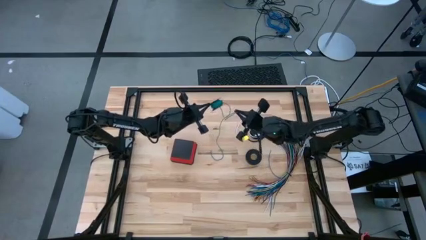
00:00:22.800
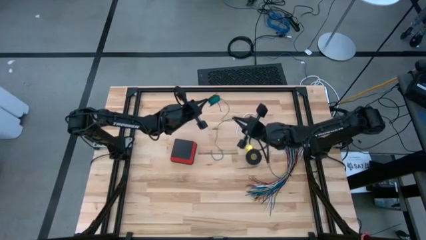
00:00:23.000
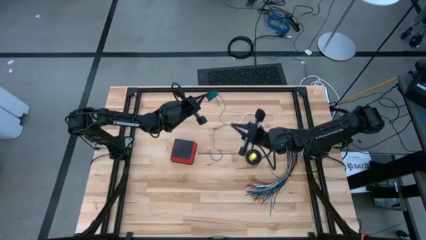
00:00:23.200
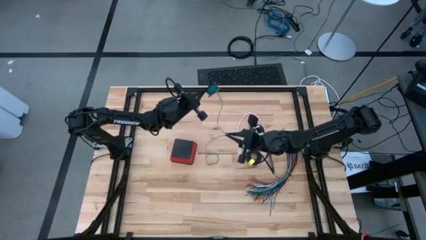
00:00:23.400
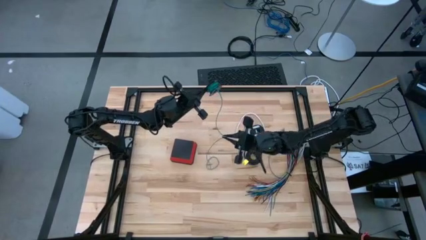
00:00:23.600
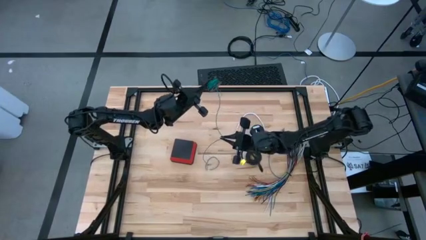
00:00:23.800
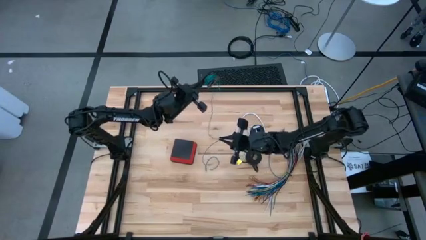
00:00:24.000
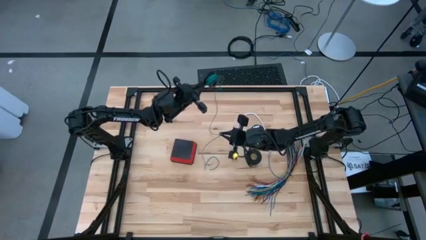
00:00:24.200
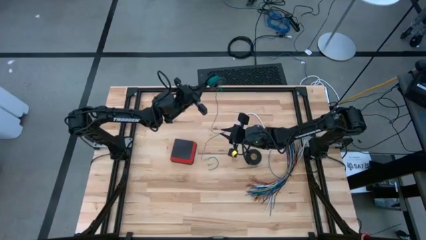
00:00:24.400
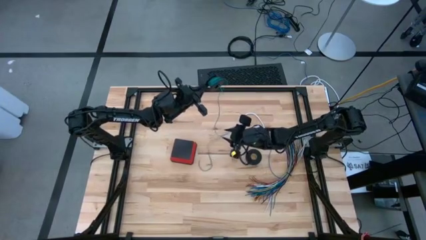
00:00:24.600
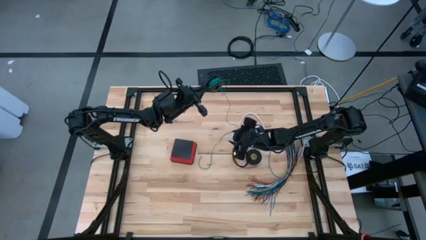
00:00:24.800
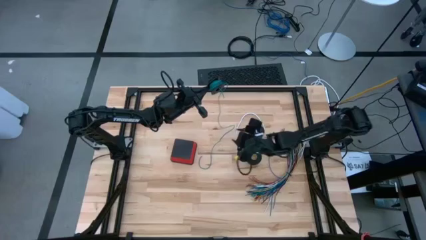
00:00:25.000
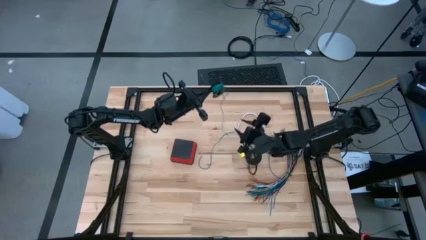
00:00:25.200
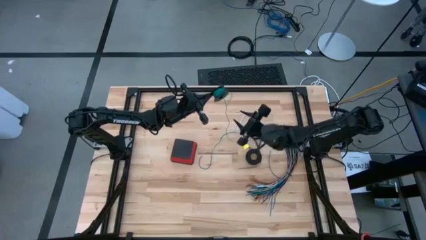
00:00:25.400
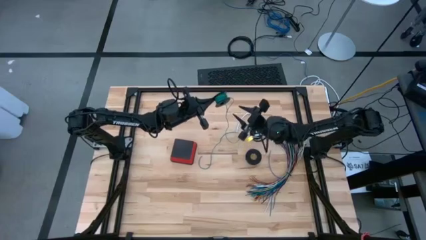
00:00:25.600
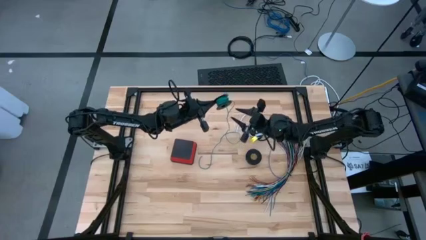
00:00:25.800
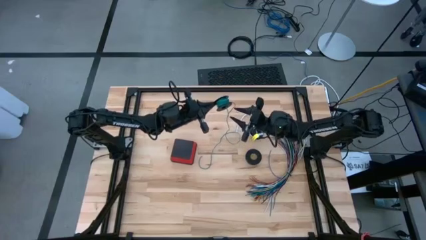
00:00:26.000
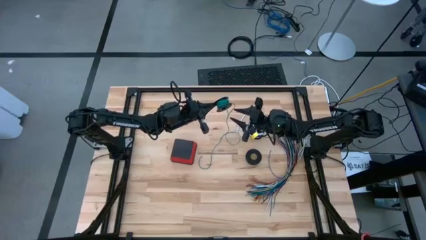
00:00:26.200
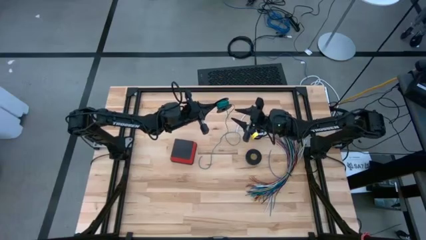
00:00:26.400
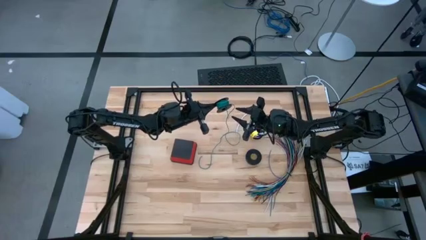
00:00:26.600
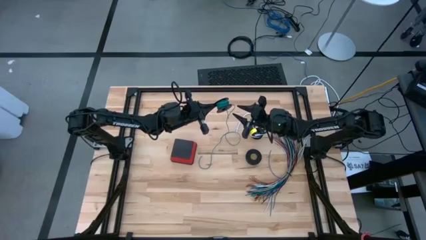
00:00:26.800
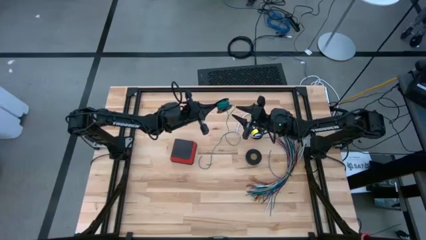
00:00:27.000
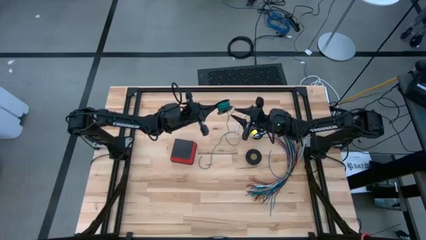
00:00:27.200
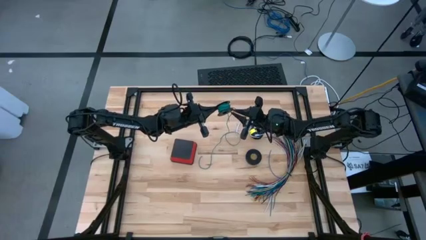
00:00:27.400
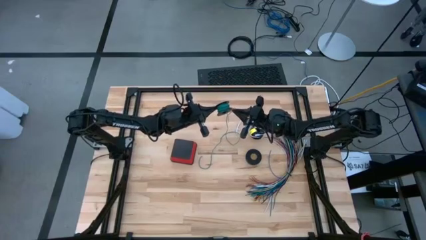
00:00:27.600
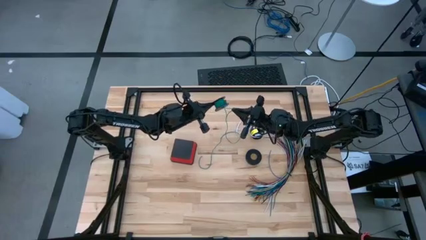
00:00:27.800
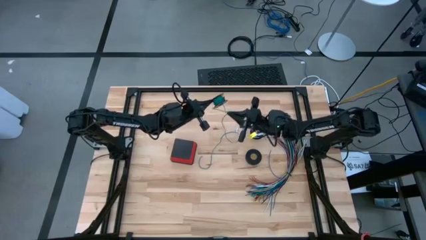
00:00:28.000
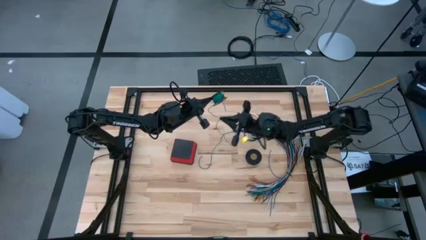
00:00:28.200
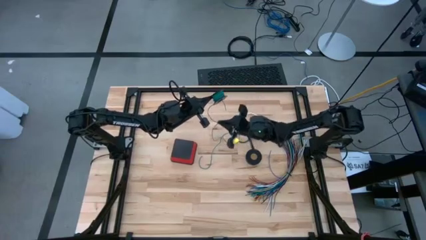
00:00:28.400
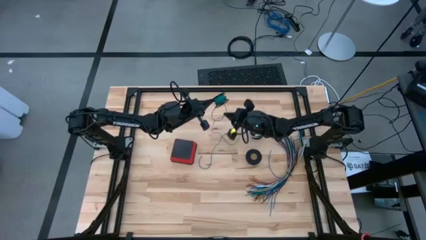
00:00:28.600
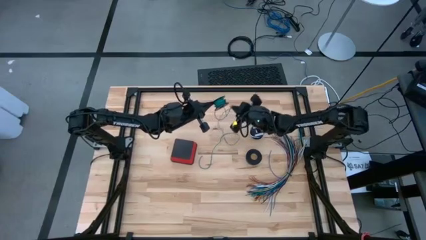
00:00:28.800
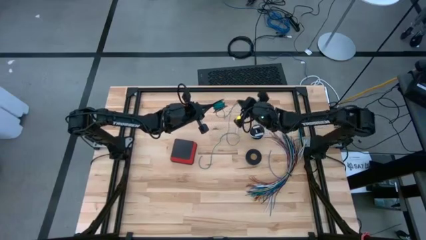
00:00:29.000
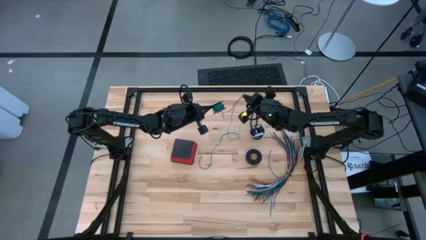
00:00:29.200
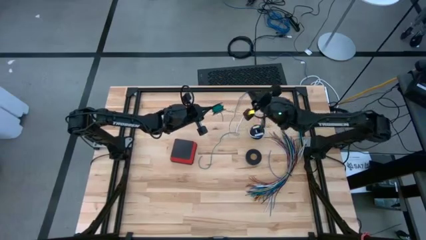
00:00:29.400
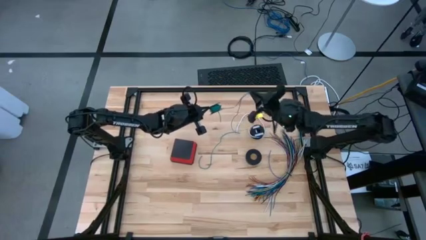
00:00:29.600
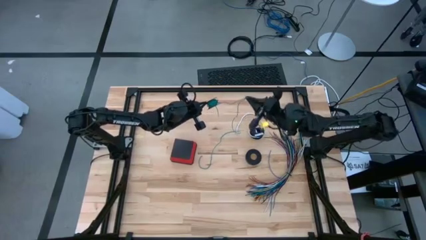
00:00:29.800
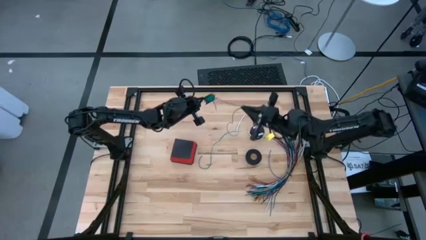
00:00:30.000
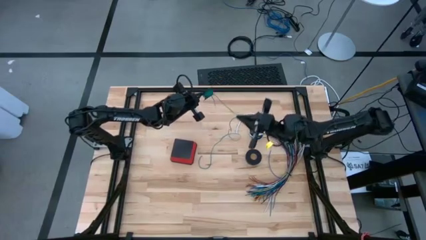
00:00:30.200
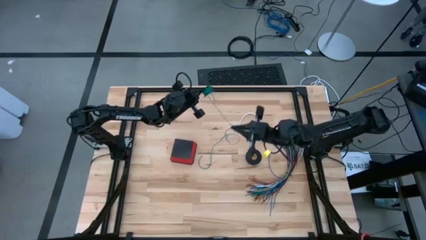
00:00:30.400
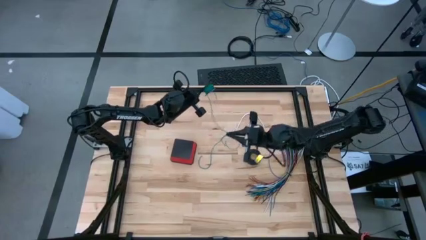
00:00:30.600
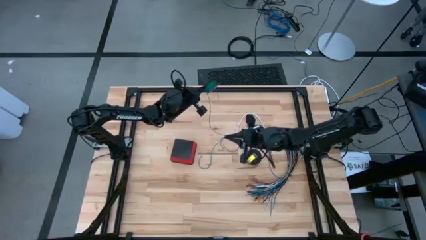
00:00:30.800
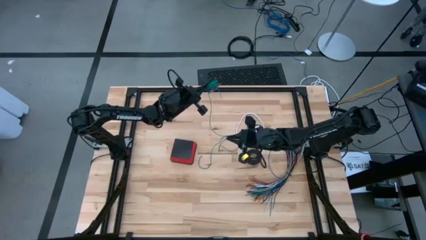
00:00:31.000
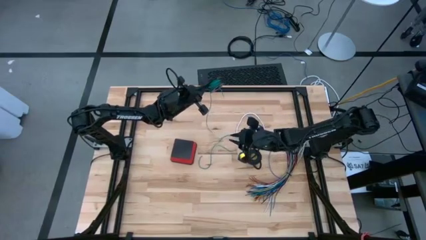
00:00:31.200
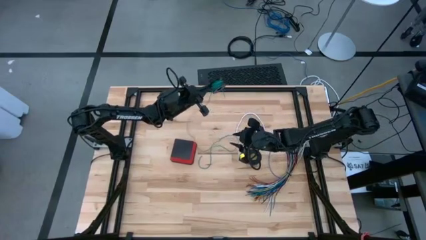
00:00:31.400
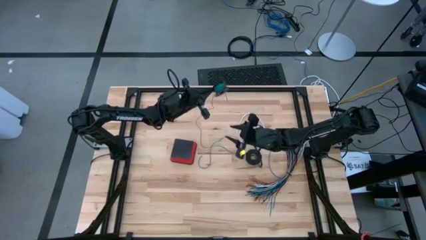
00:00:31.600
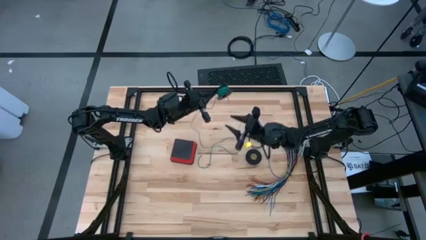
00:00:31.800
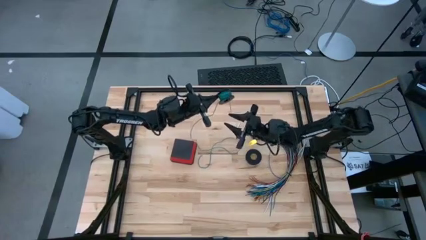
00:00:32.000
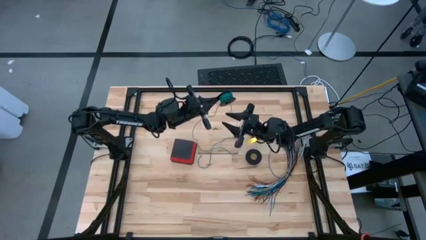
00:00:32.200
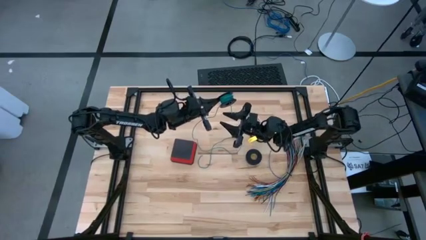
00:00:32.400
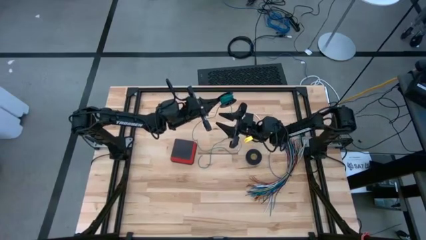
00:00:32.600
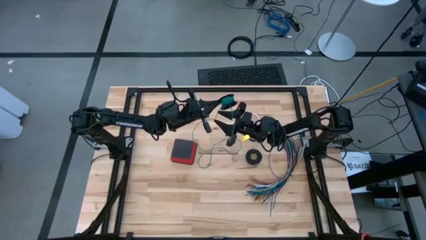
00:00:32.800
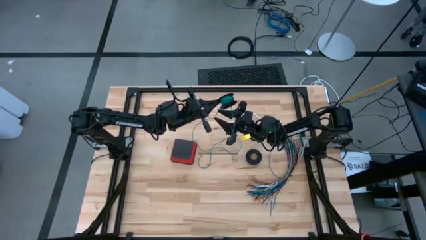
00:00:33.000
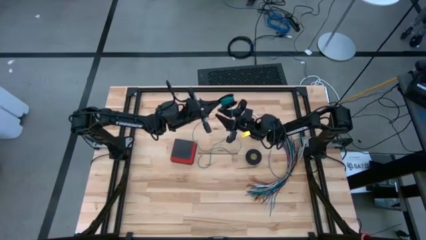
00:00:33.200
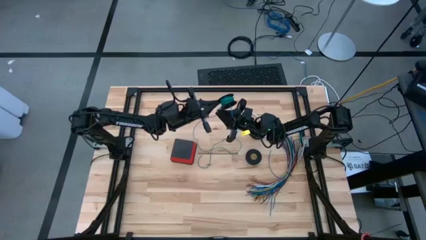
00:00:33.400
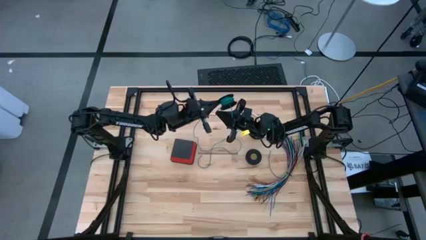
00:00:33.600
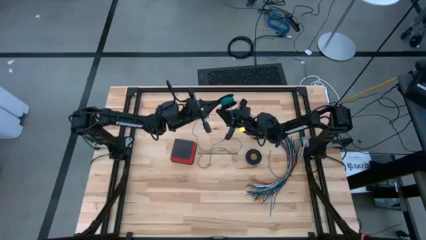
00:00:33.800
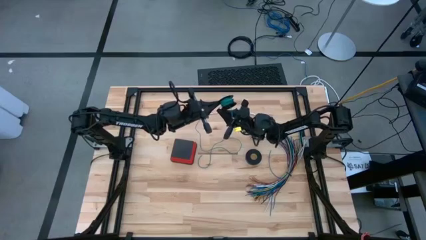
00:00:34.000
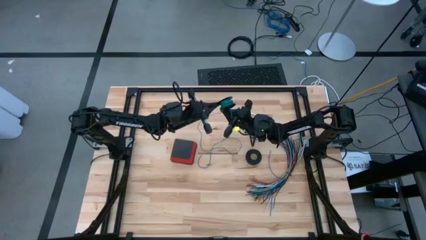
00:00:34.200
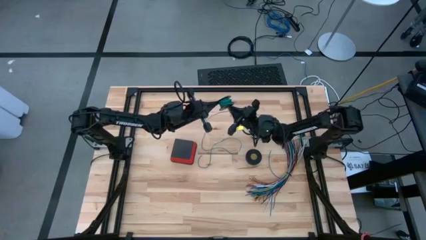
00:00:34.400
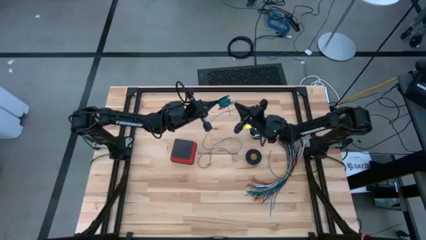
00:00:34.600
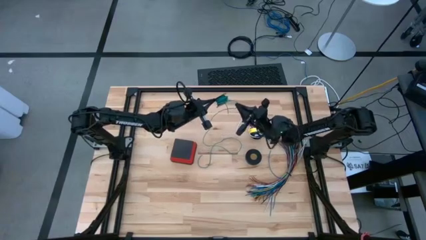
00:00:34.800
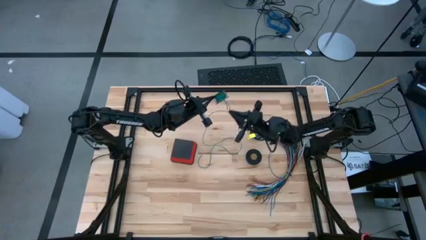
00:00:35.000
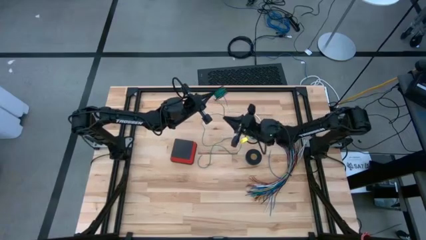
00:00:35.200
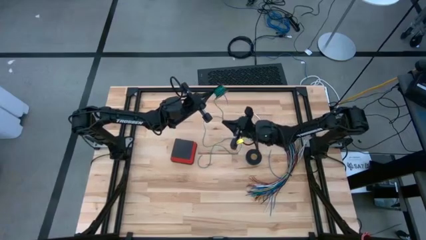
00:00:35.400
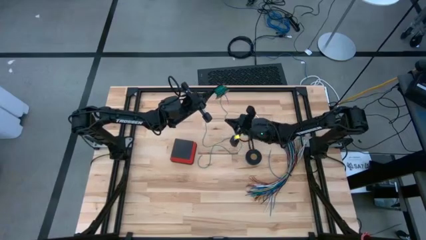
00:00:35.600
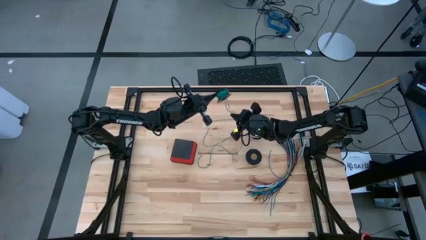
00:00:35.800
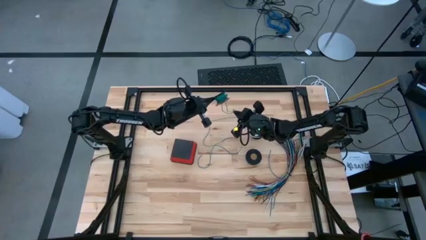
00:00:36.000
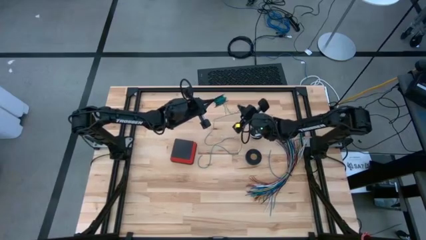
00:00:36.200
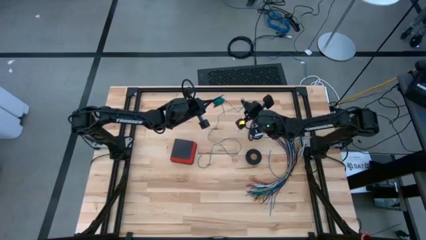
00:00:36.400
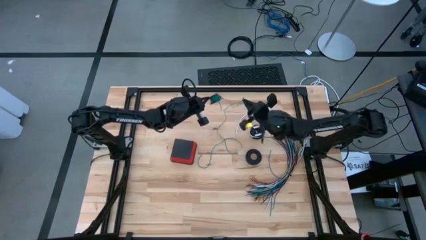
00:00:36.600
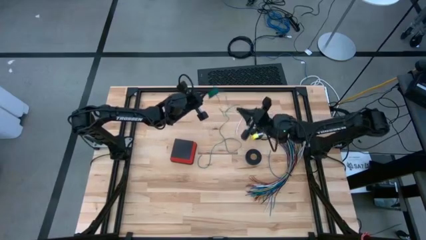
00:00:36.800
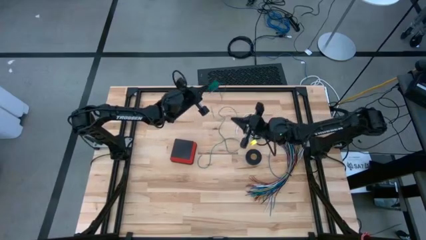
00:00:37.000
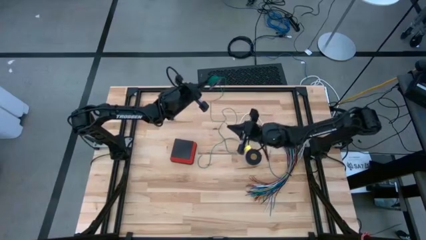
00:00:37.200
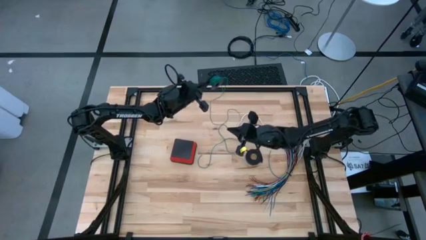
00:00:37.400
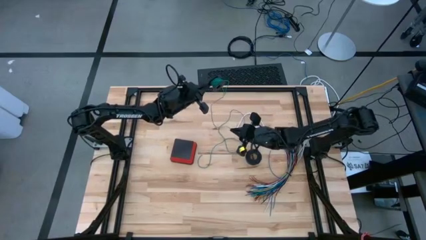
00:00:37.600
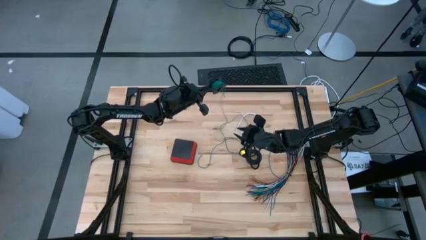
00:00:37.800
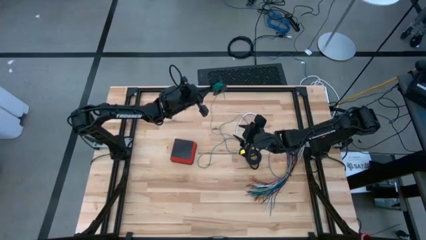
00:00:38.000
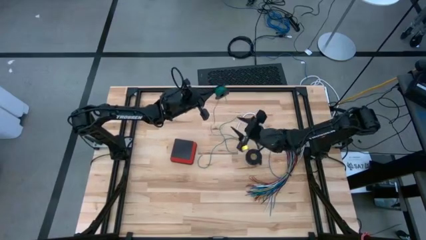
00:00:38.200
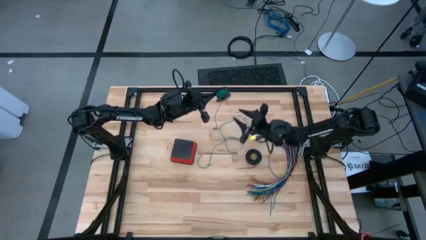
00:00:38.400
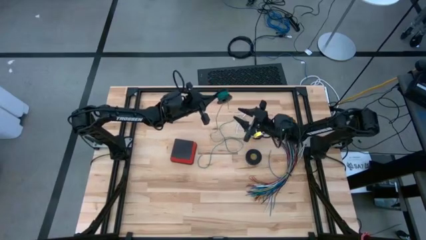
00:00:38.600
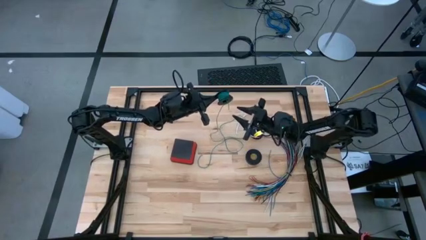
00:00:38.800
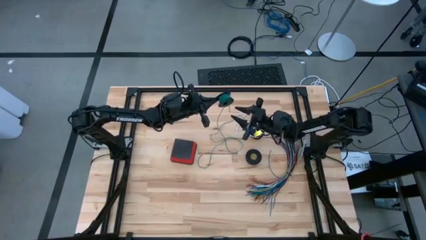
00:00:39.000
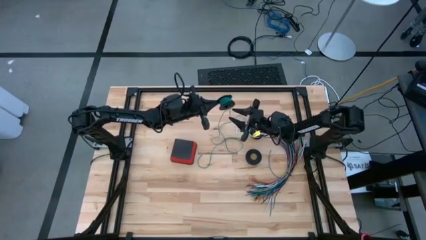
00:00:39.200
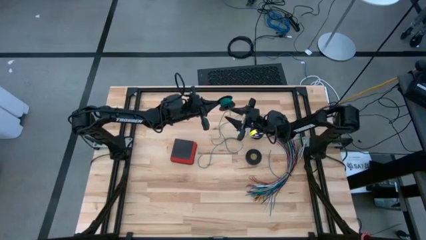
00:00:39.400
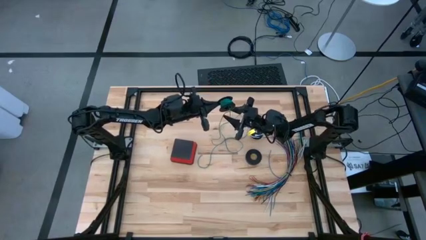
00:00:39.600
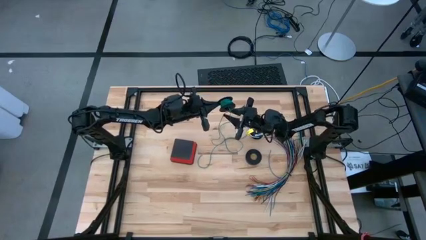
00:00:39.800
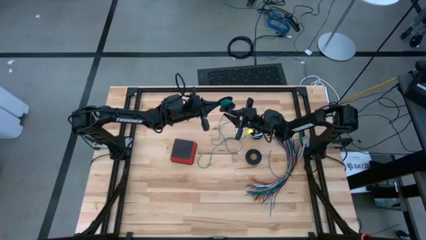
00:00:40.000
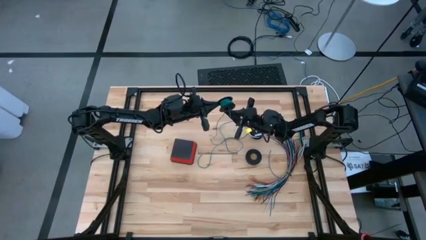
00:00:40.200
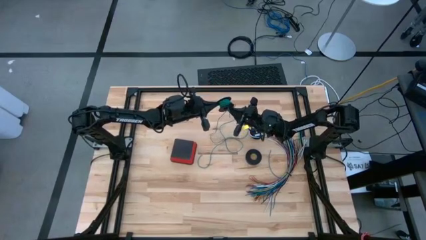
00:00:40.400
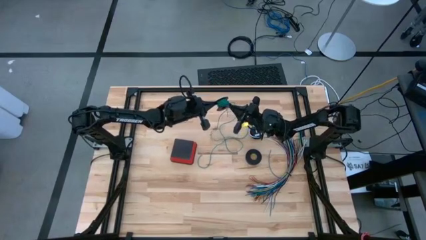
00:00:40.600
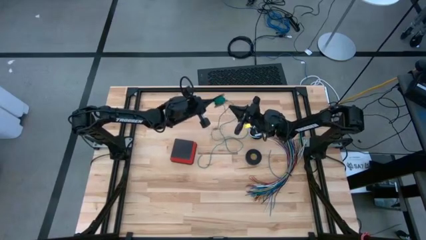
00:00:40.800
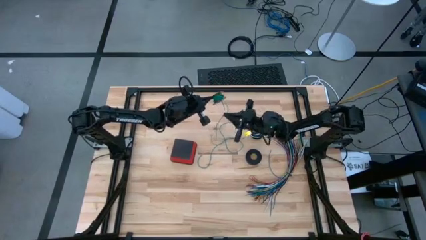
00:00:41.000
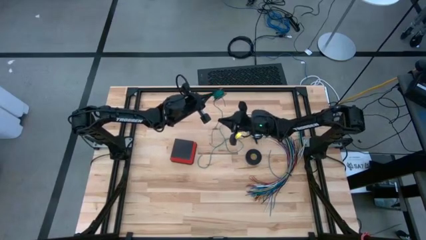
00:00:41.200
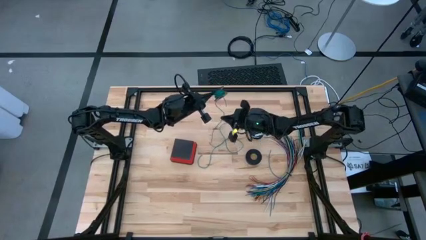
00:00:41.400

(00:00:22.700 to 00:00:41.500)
Task: Coiling cords
Uncoil the green wire cable from the spool
